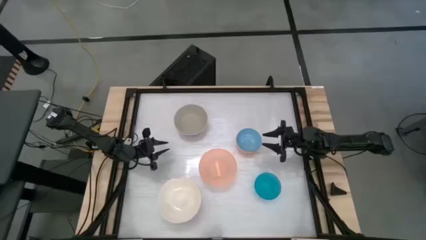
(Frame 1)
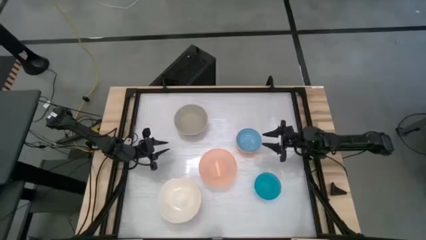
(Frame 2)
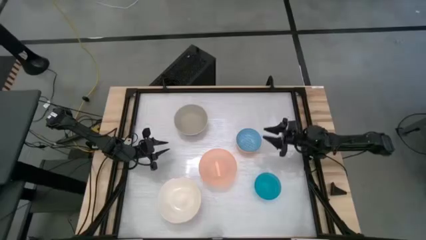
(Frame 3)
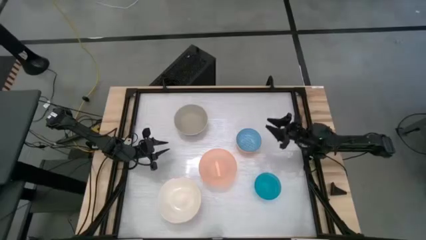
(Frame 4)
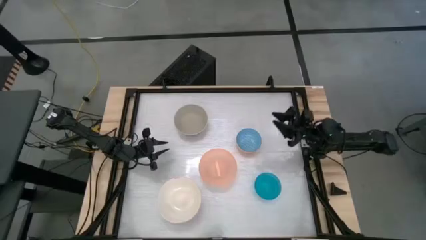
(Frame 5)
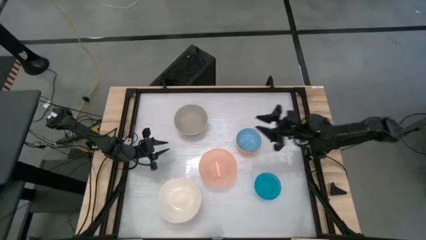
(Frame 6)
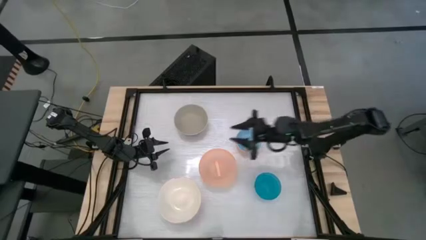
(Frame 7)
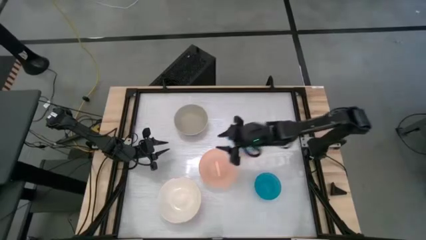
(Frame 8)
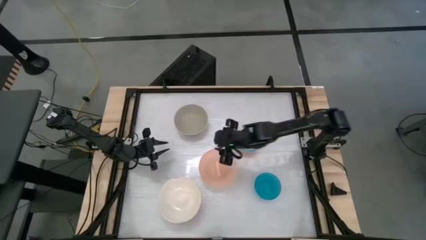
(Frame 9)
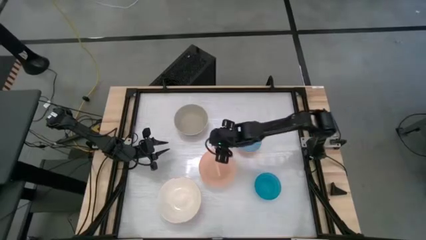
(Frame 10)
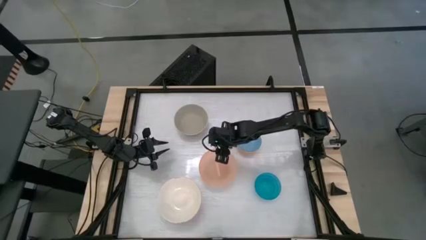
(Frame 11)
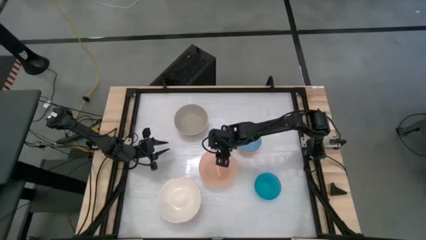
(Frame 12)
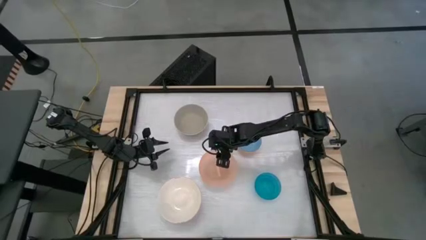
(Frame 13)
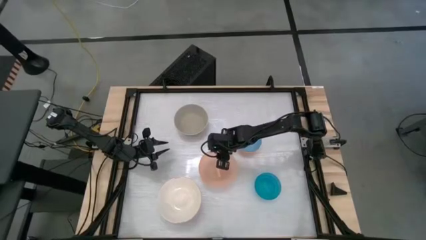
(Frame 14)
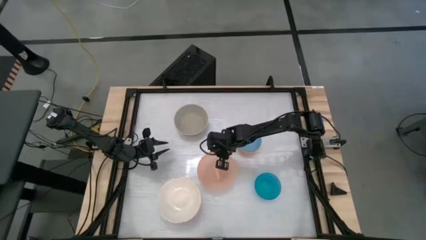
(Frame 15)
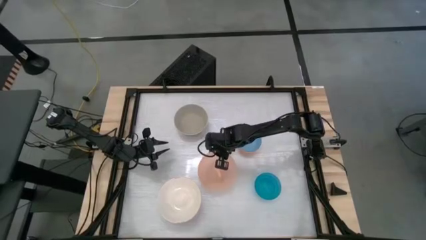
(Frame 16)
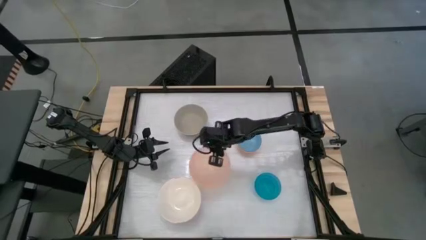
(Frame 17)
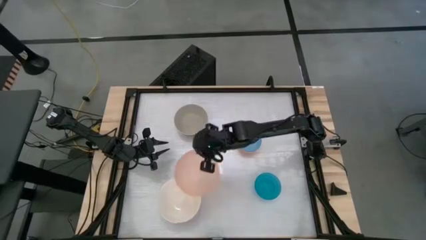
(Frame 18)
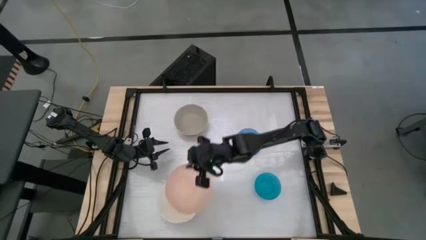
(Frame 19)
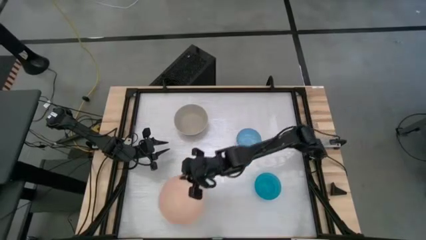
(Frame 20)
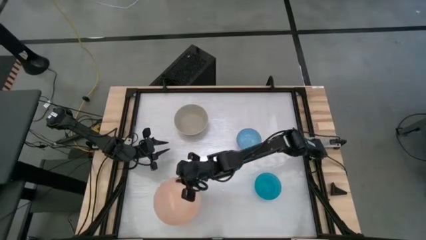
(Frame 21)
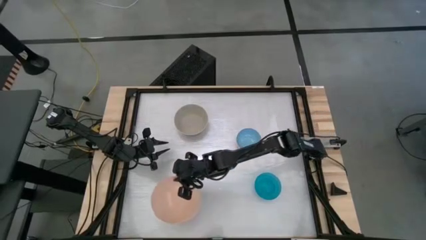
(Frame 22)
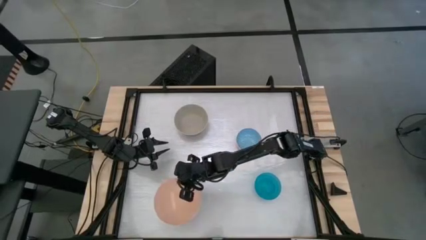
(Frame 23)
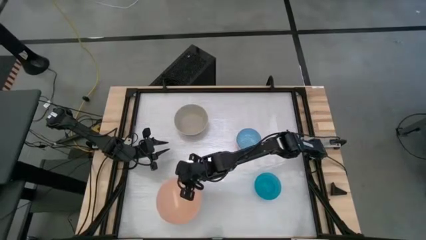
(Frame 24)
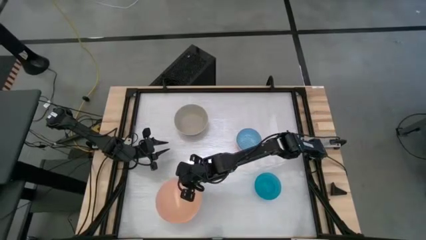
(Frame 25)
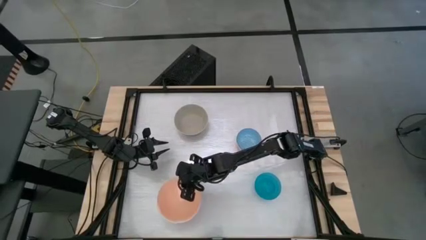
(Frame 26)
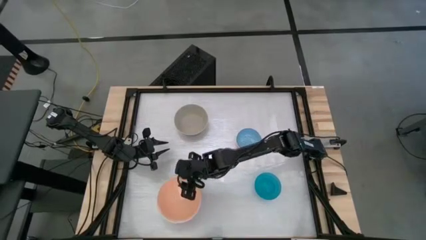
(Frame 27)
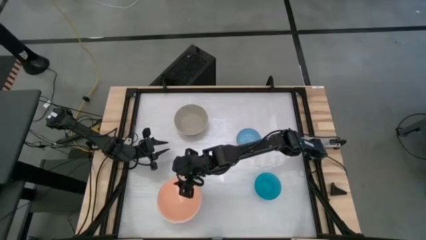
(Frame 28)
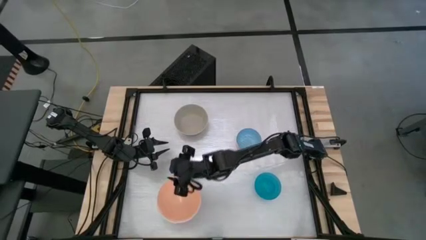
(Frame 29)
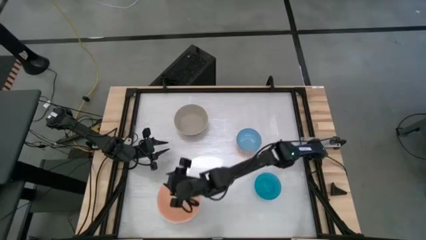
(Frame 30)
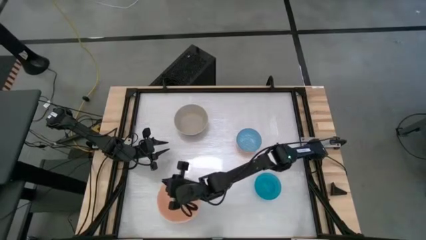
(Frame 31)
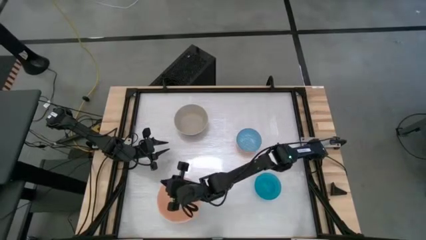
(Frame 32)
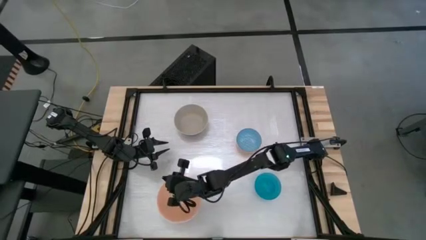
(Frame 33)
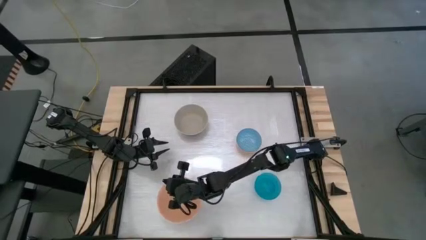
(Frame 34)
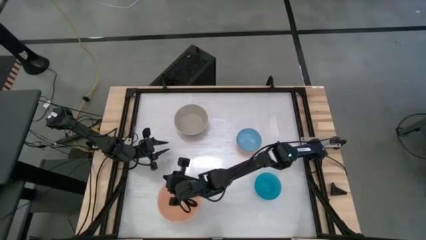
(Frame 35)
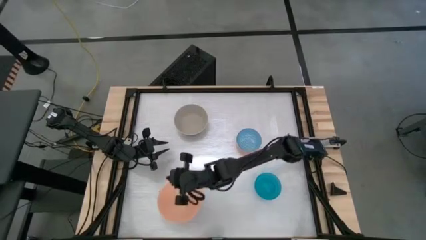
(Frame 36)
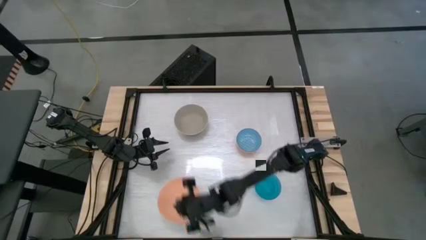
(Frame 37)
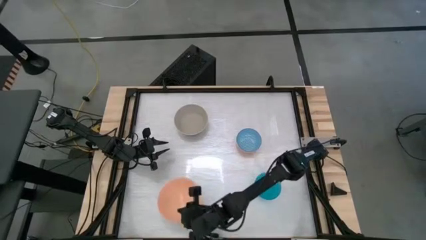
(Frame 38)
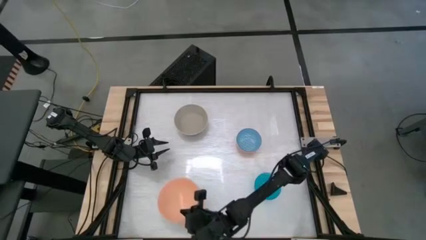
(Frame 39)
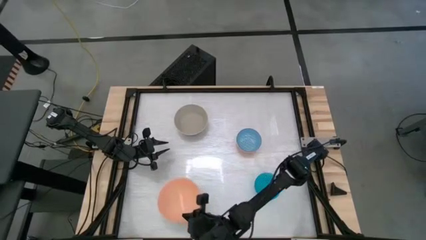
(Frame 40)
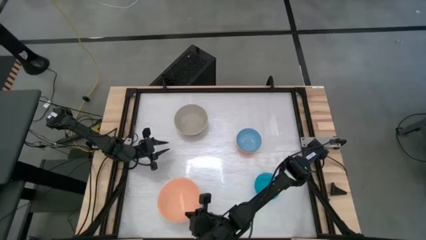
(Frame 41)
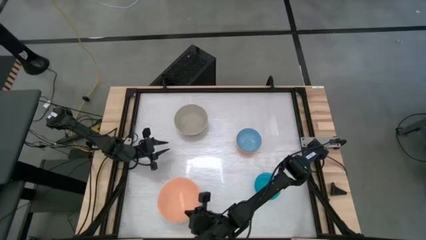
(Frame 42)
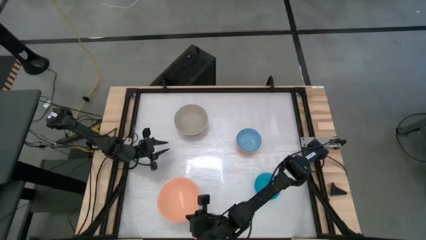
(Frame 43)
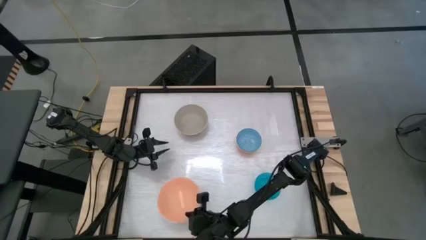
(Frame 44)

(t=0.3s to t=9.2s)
Stack the bottom orange bowl on top of the white bowl

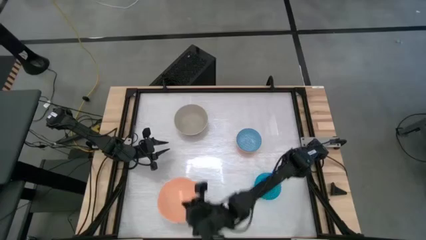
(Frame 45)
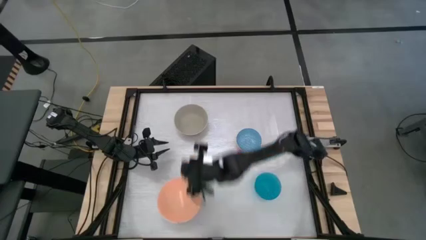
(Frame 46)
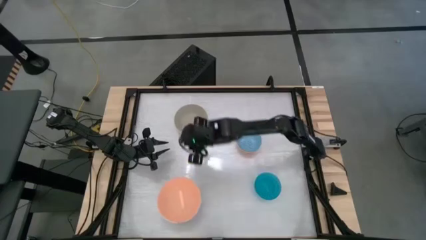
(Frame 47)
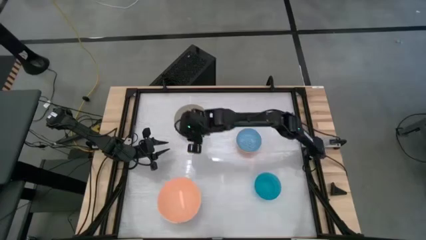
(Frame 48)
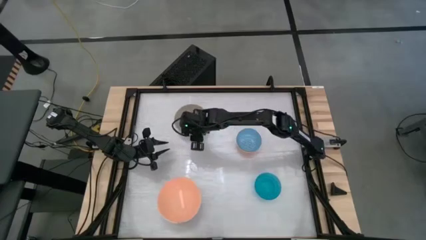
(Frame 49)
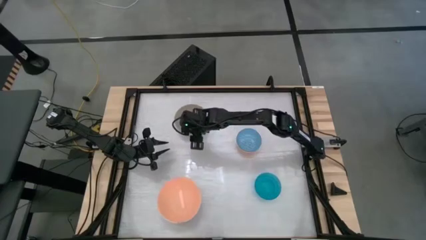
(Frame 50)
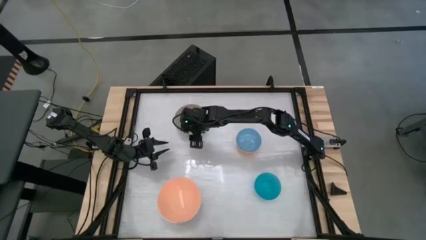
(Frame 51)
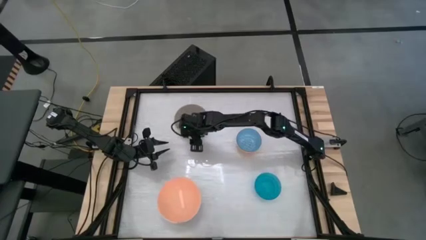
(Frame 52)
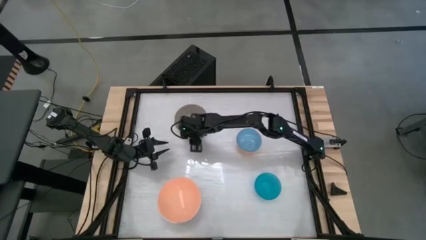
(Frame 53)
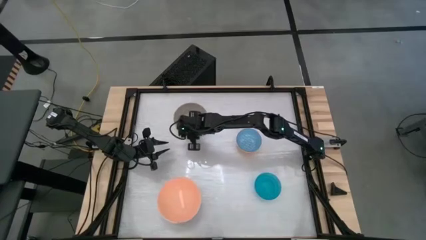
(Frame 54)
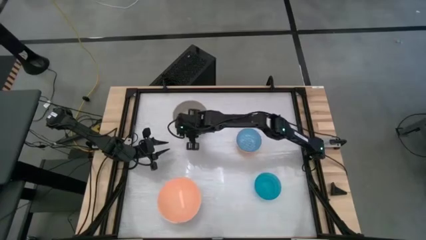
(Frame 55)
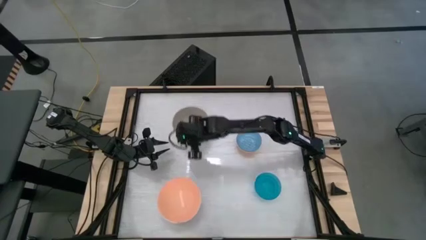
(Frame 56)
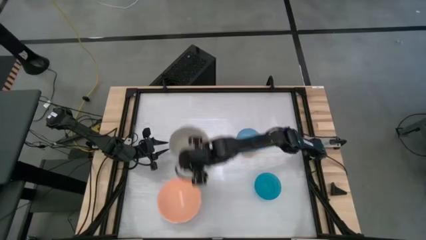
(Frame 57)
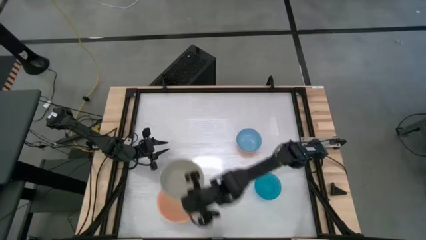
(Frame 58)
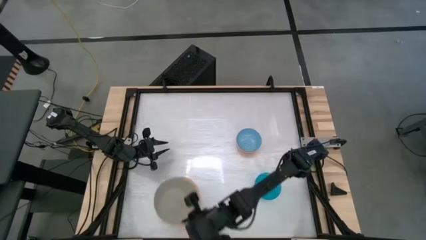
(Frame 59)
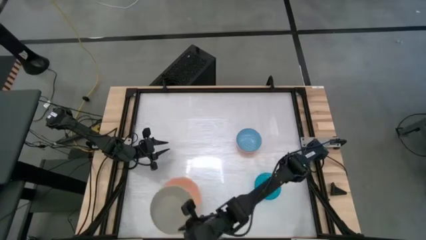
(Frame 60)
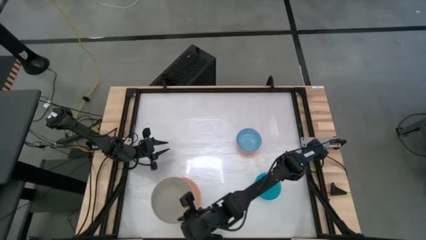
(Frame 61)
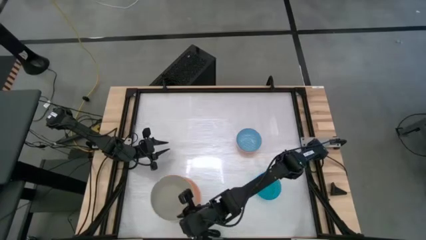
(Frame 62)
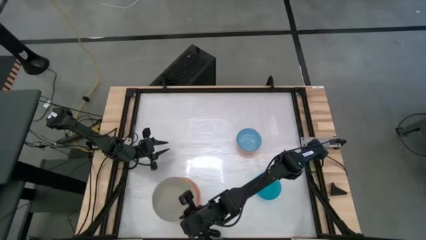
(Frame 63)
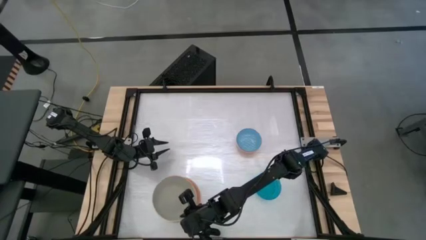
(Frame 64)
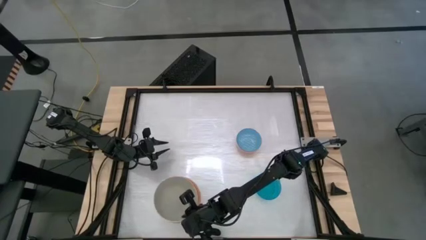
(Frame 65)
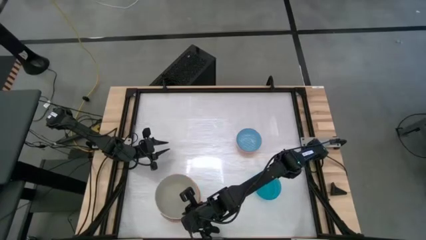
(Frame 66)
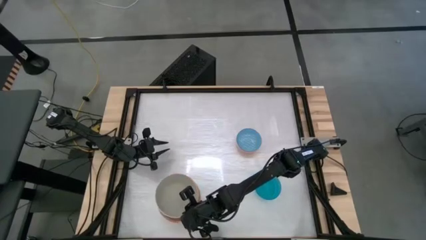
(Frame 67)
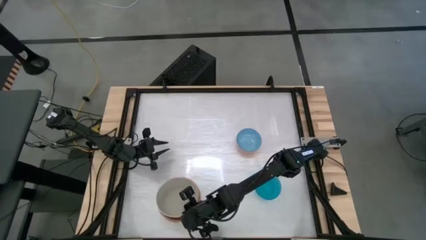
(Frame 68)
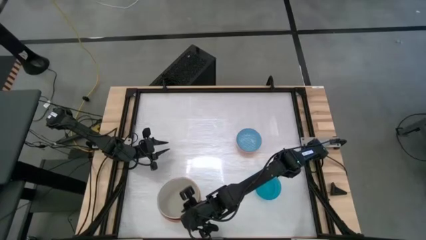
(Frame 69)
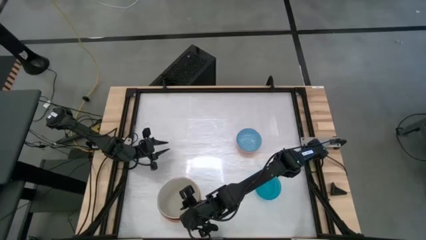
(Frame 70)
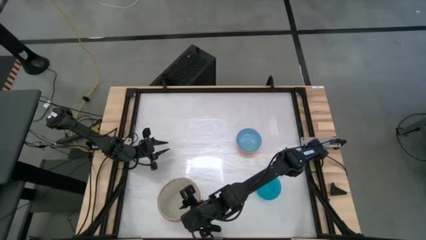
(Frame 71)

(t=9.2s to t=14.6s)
Stack the gray bowl on top of the orange bowl
